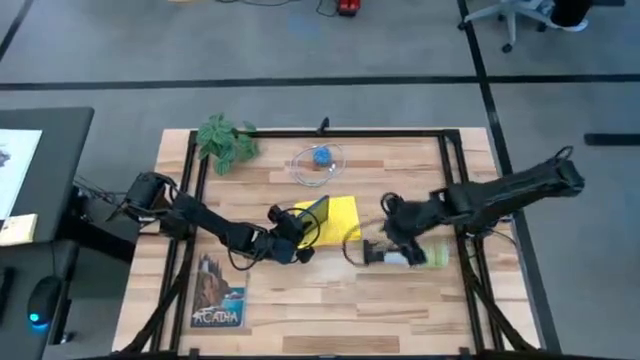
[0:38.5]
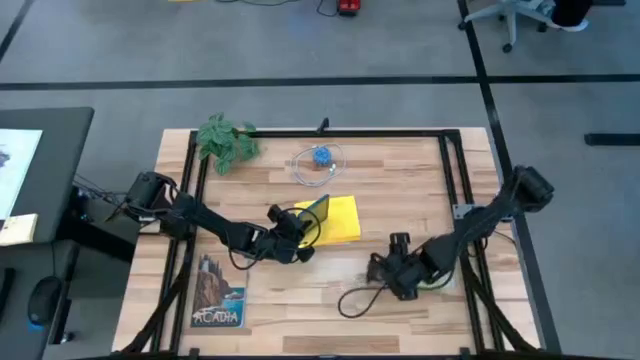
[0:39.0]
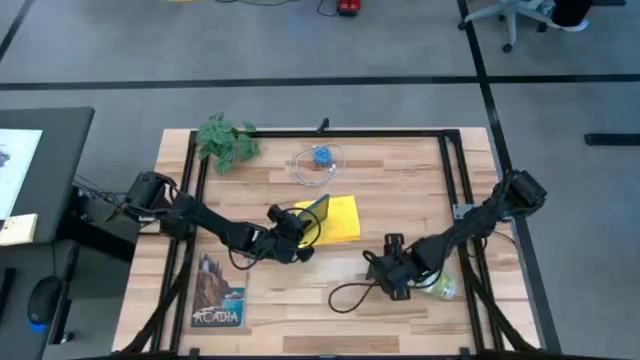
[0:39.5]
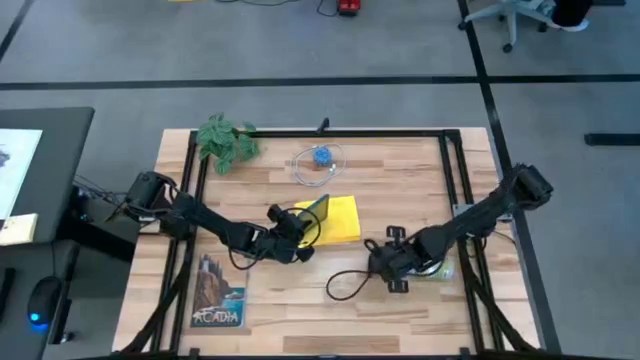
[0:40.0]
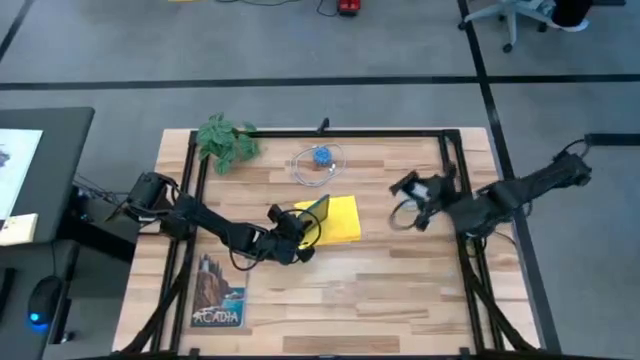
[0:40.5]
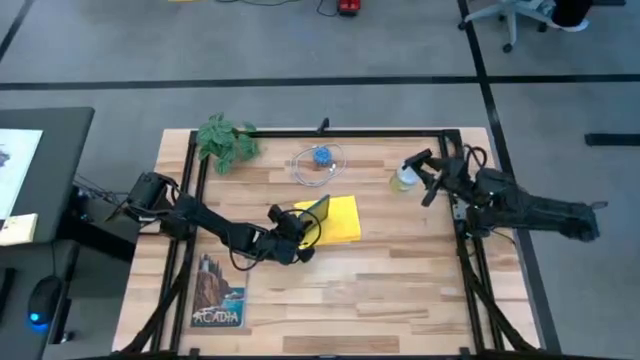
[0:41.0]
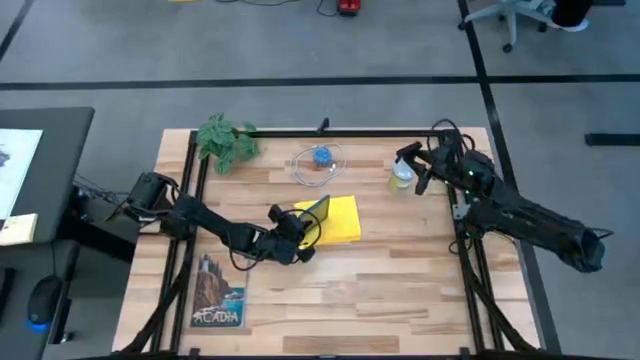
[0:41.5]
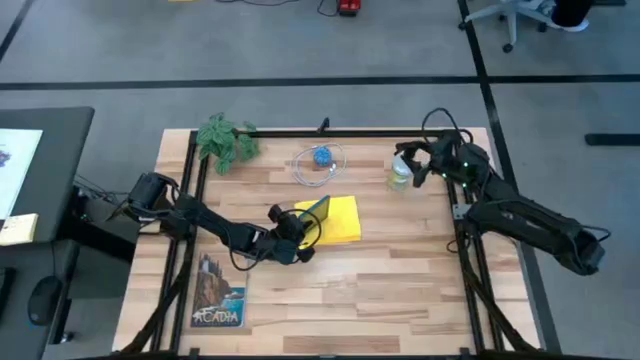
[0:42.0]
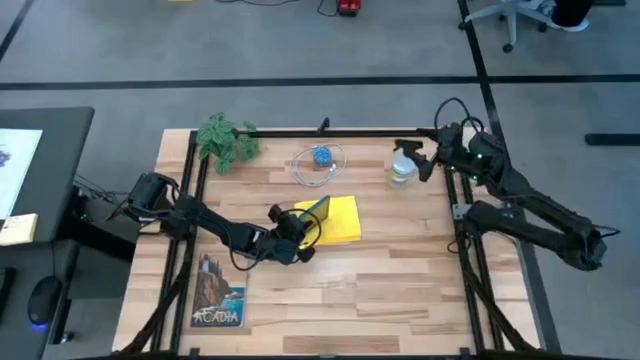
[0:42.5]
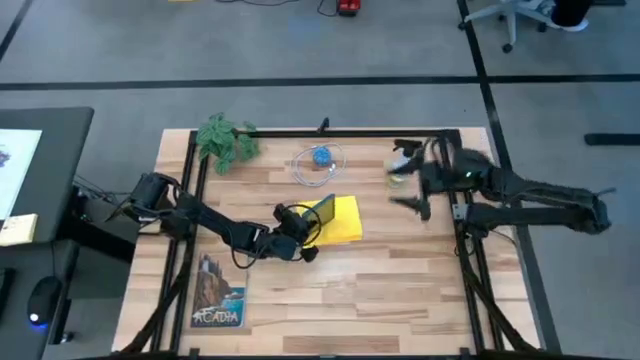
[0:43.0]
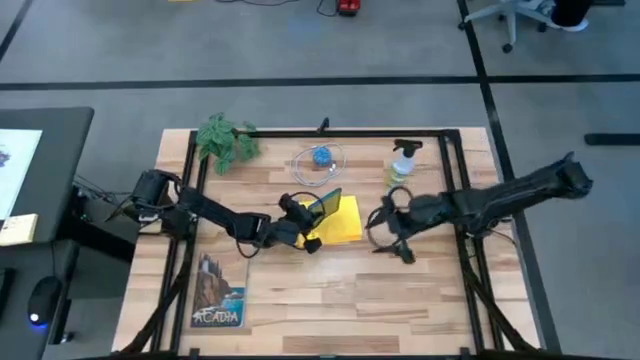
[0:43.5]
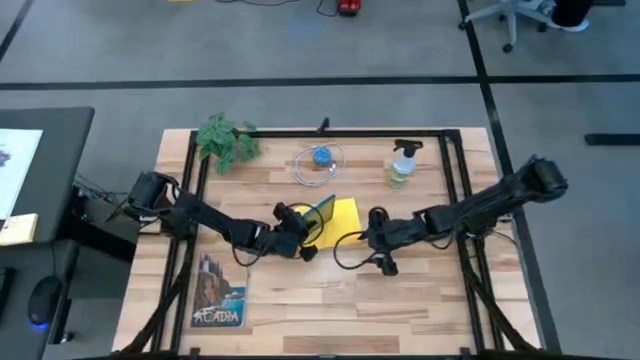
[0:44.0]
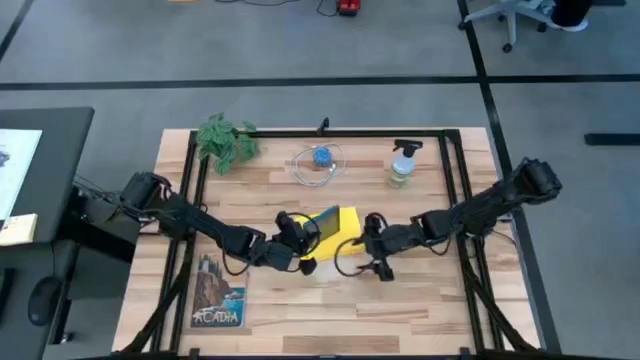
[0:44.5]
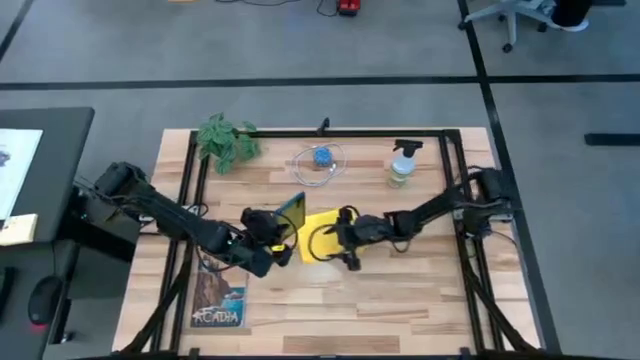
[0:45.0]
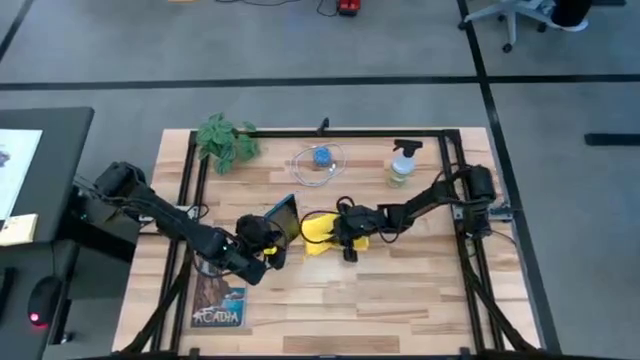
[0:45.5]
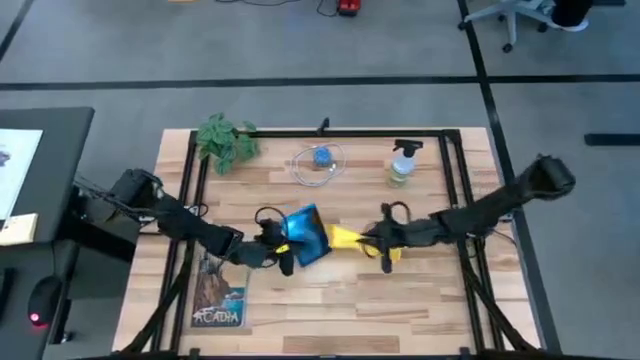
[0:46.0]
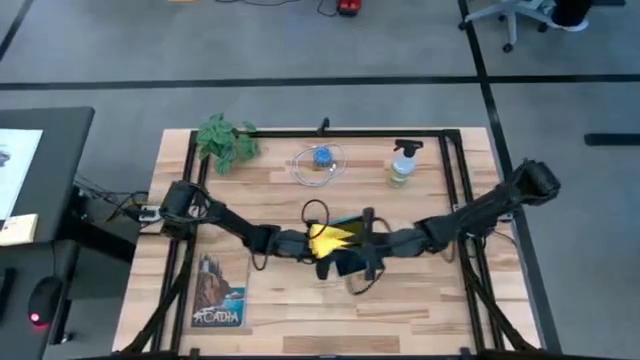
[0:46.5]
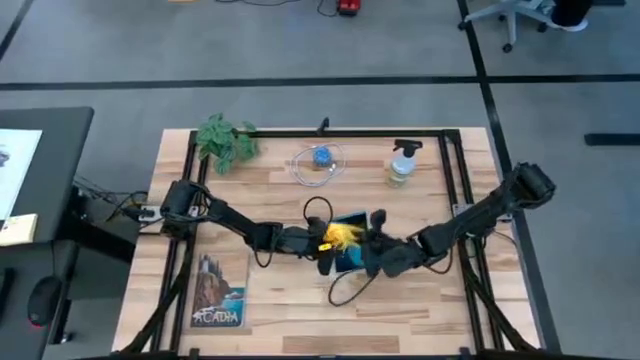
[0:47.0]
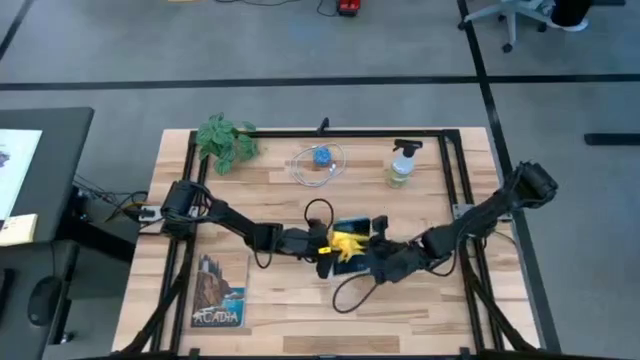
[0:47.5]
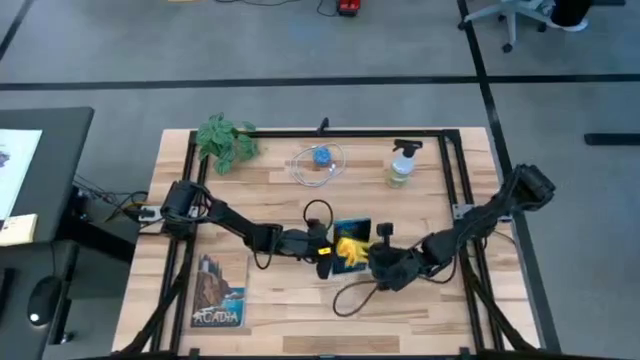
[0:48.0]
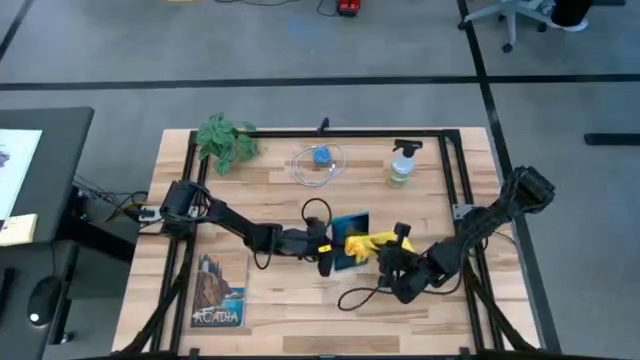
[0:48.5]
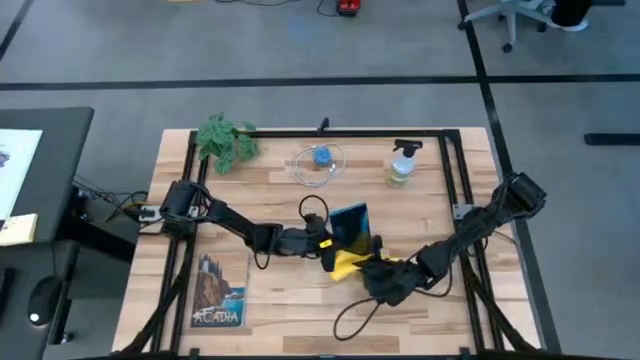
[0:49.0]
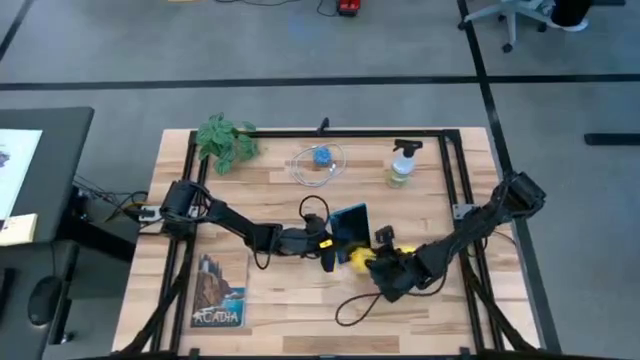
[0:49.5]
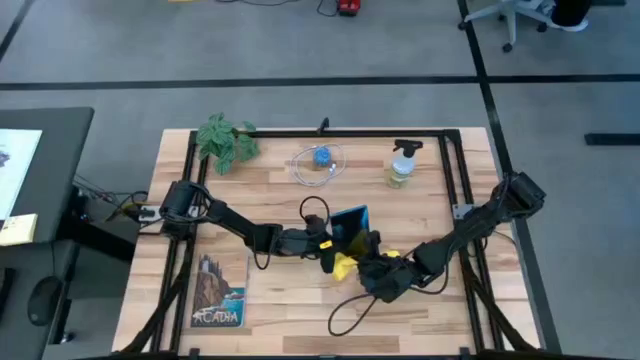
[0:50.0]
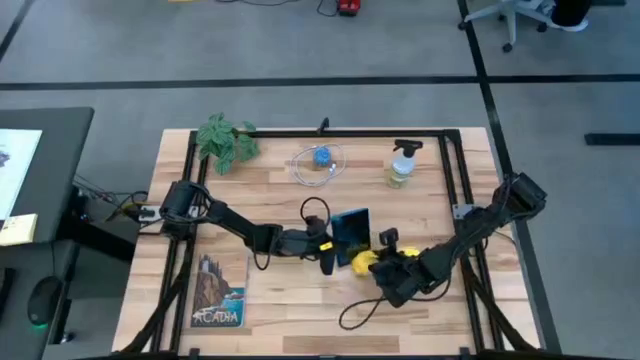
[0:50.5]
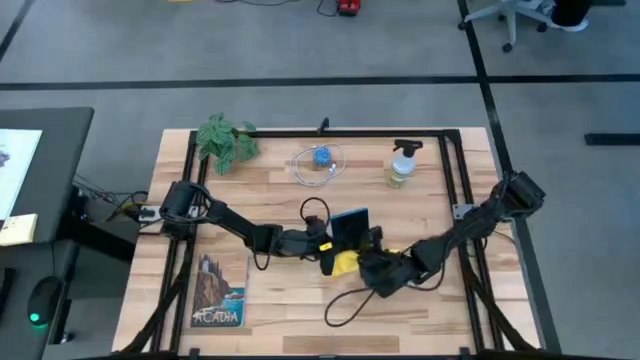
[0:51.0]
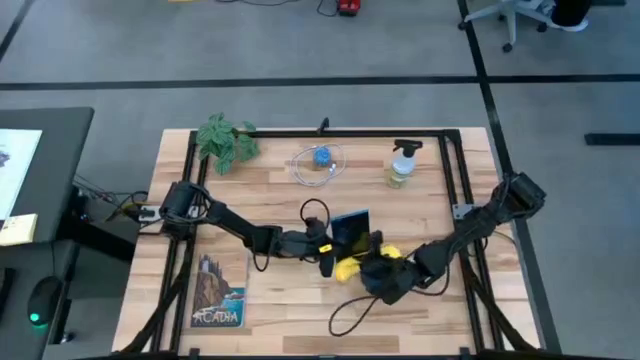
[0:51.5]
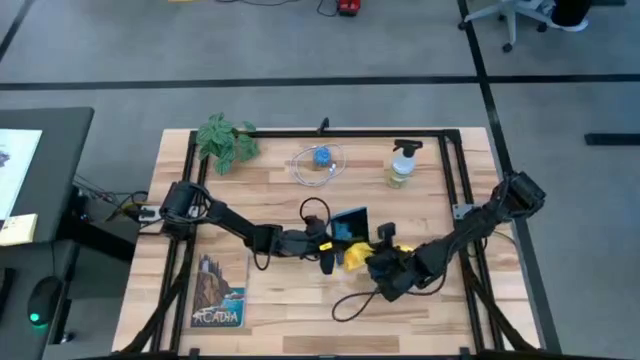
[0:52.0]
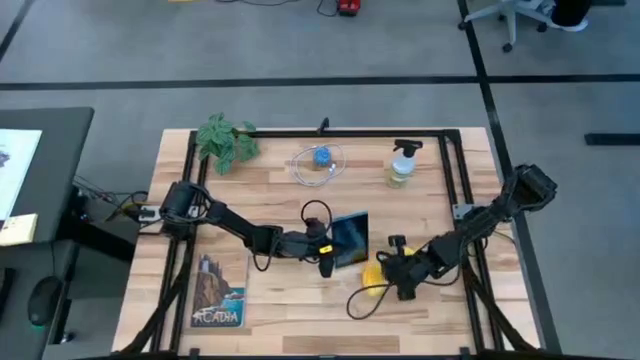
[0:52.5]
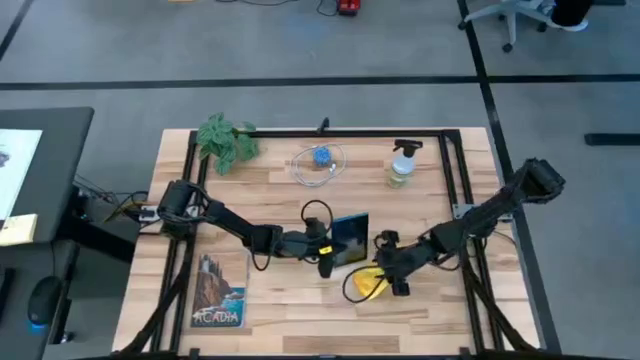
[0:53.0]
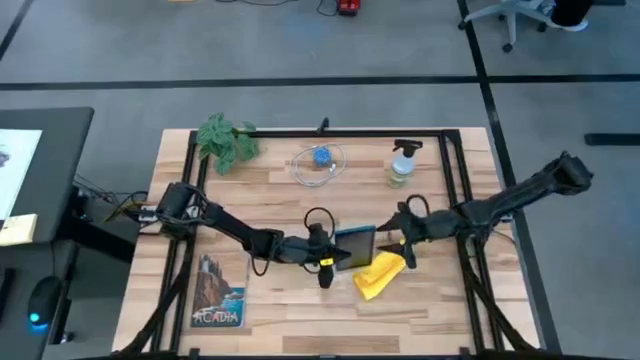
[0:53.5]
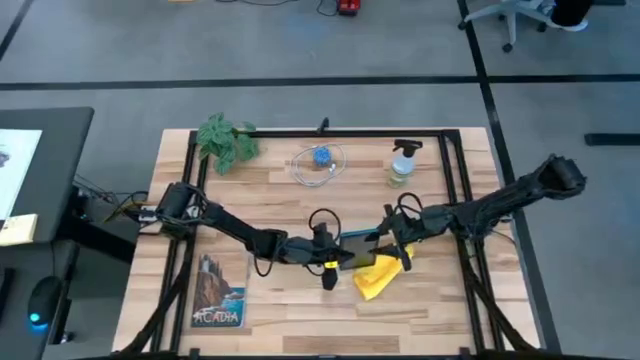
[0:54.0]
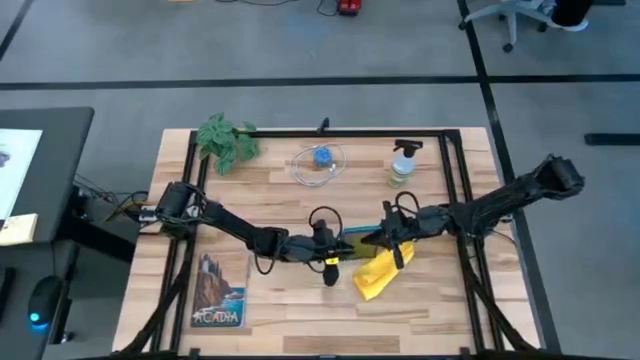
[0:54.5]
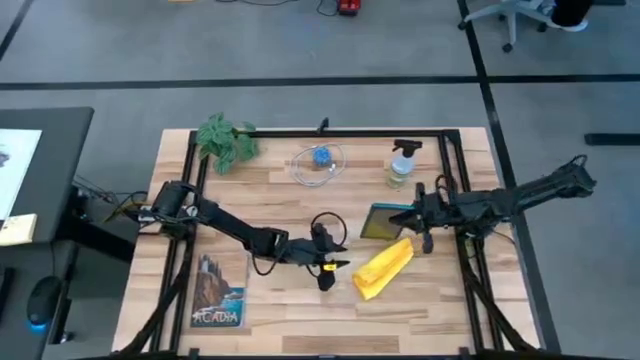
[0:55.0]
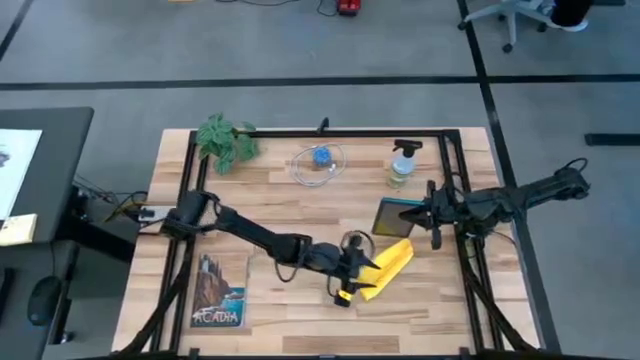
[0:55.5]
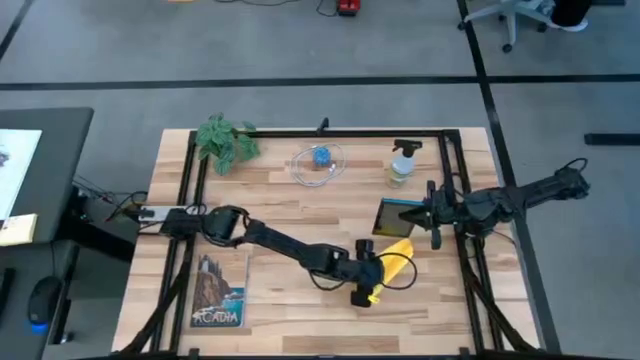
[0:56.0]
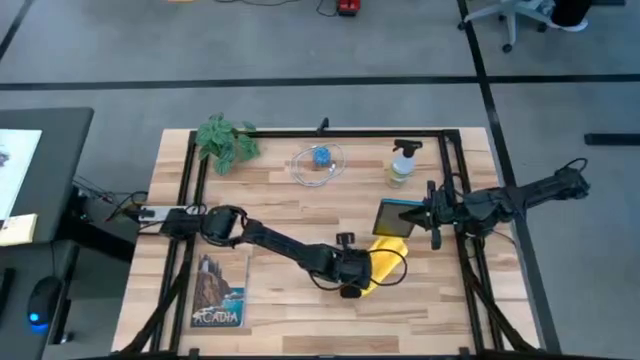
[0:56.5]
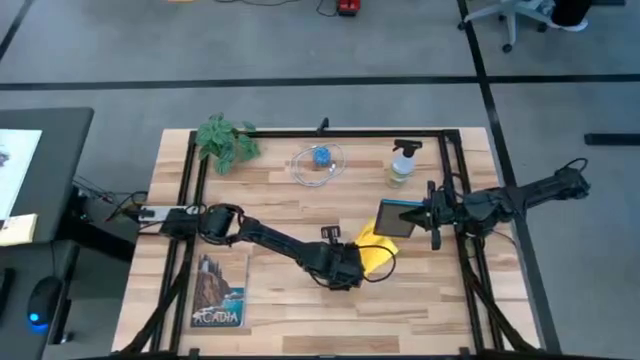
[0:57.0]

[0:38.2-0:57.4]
Task: Apply microfiber cloth
Wipe the tablet with the yellow microfiber cloth
